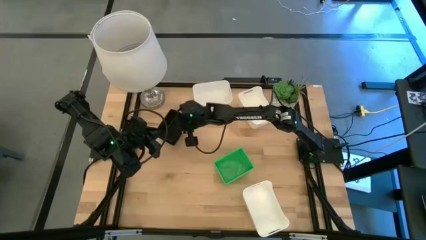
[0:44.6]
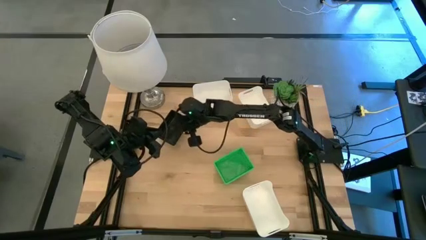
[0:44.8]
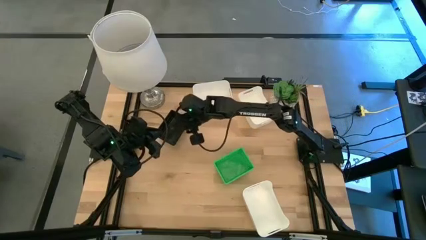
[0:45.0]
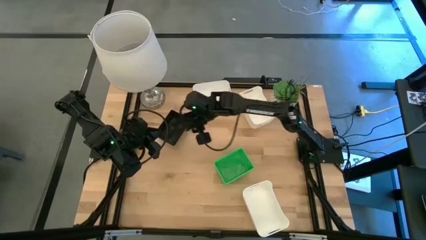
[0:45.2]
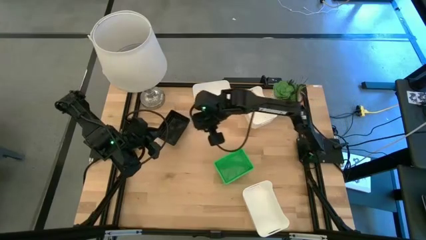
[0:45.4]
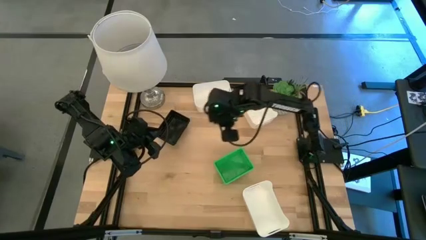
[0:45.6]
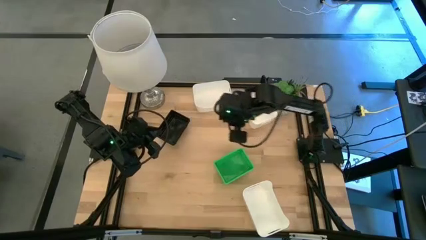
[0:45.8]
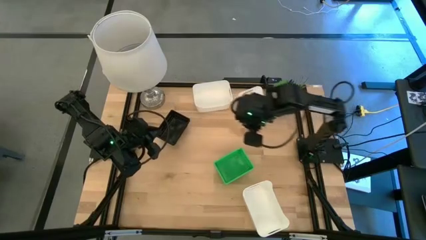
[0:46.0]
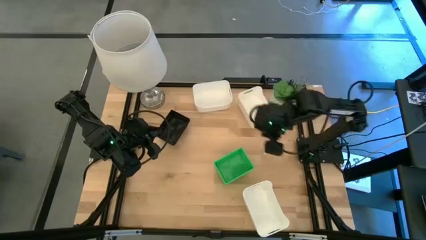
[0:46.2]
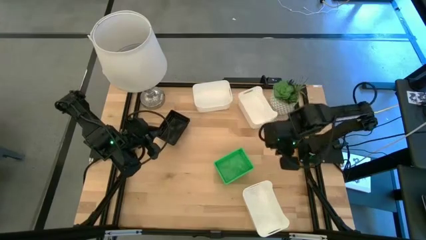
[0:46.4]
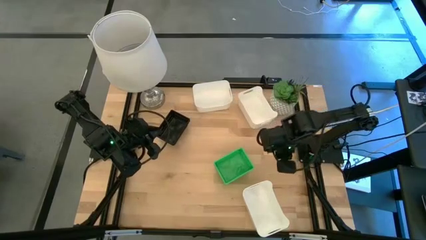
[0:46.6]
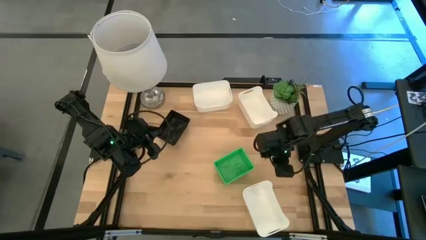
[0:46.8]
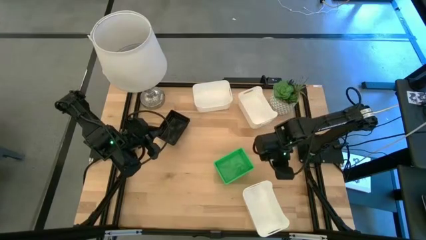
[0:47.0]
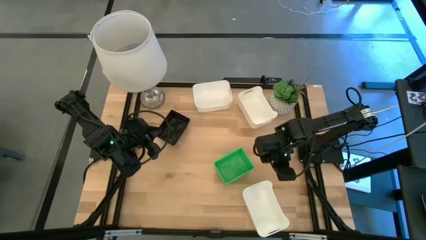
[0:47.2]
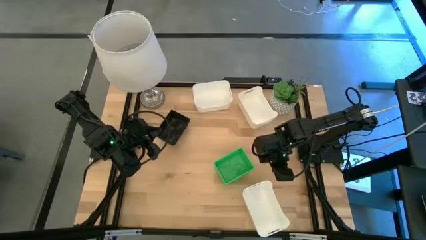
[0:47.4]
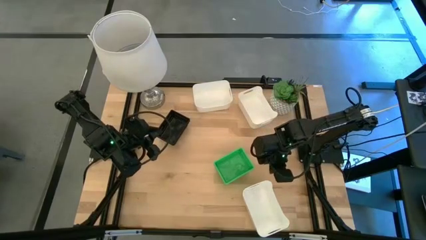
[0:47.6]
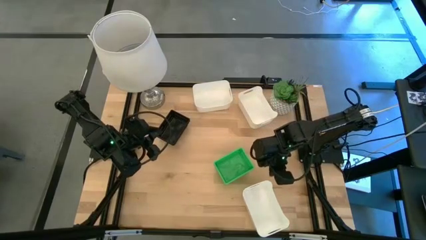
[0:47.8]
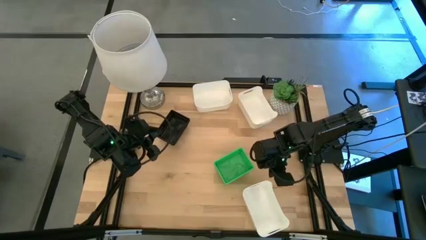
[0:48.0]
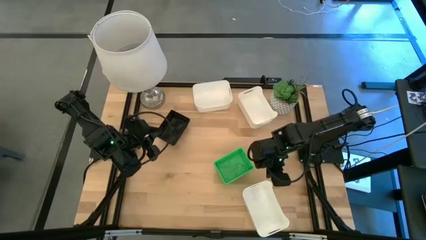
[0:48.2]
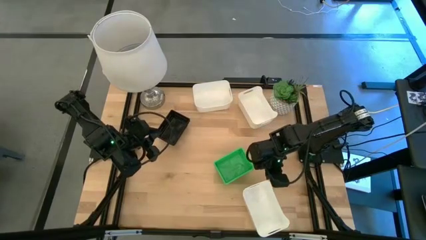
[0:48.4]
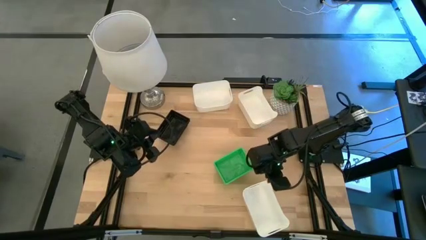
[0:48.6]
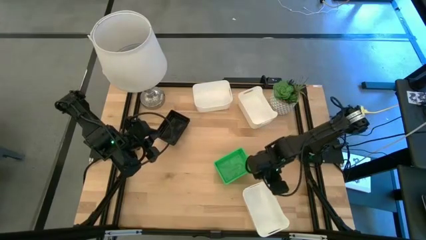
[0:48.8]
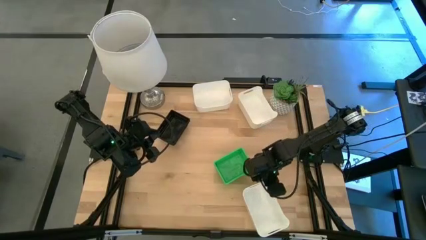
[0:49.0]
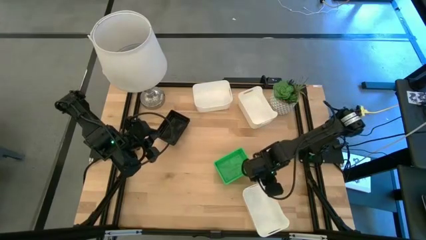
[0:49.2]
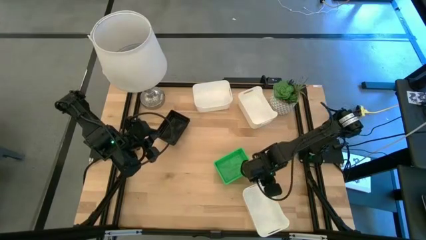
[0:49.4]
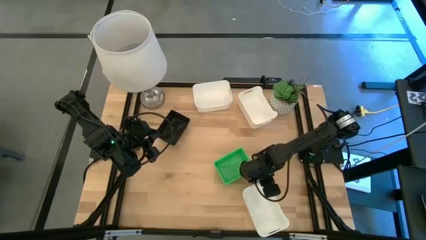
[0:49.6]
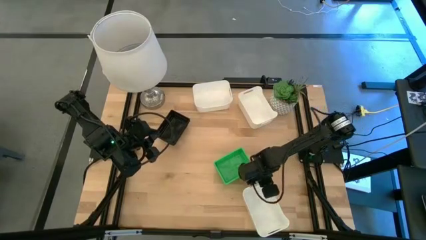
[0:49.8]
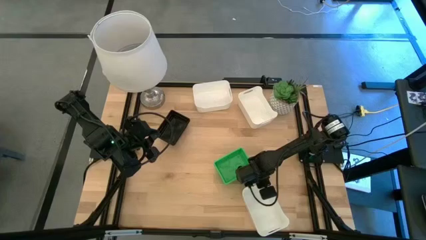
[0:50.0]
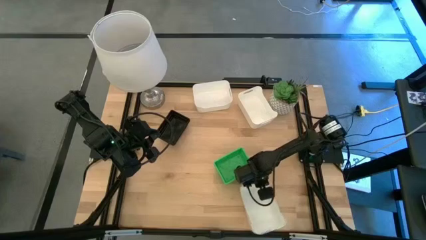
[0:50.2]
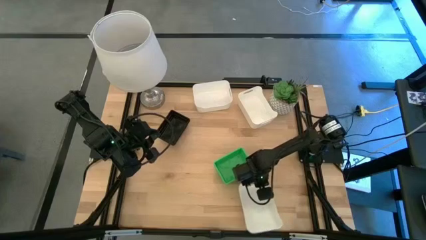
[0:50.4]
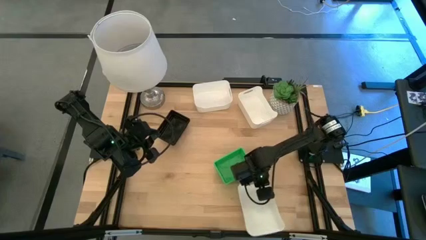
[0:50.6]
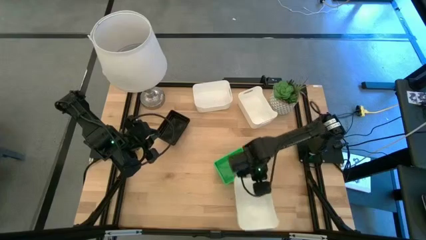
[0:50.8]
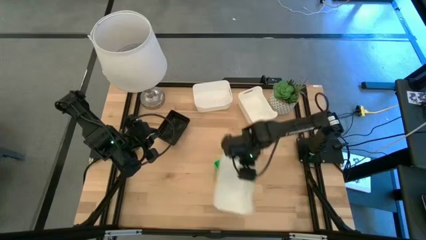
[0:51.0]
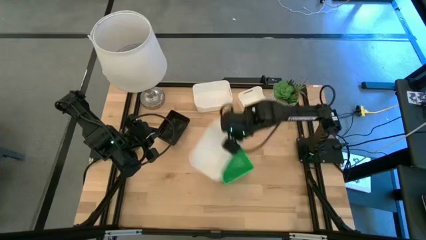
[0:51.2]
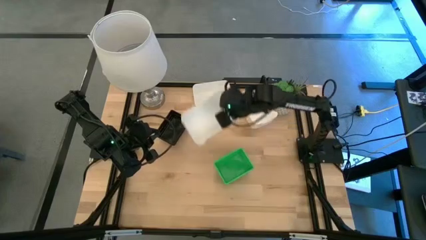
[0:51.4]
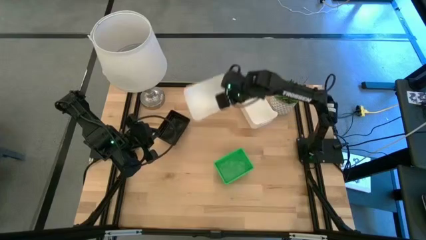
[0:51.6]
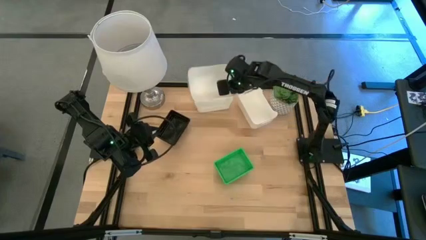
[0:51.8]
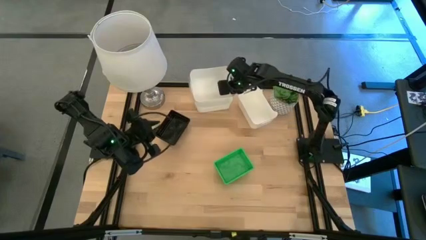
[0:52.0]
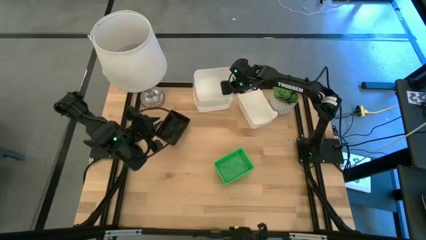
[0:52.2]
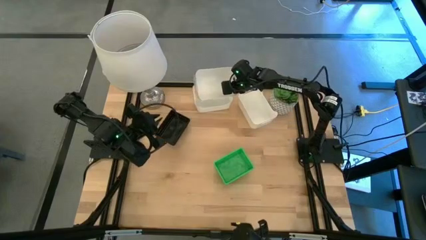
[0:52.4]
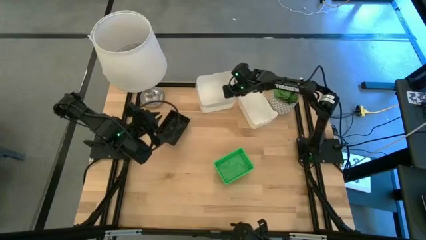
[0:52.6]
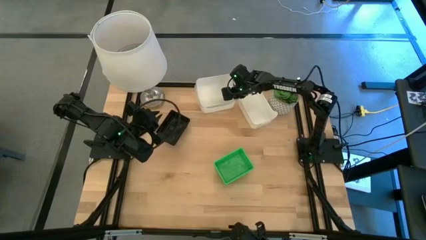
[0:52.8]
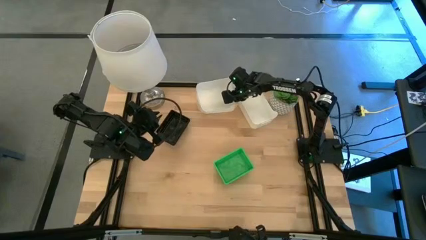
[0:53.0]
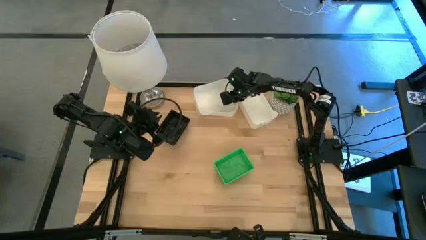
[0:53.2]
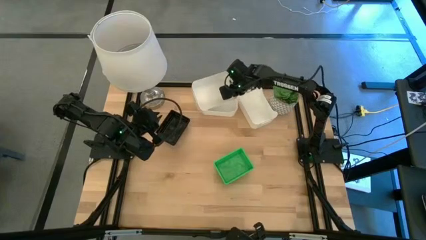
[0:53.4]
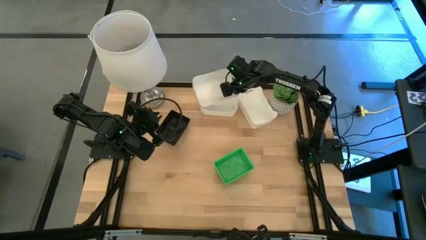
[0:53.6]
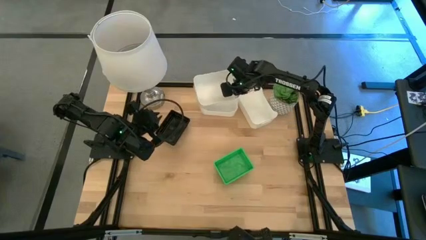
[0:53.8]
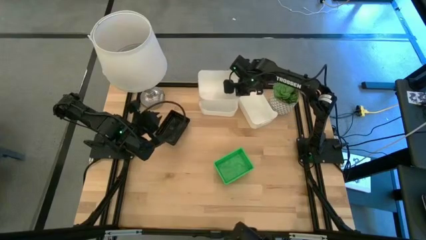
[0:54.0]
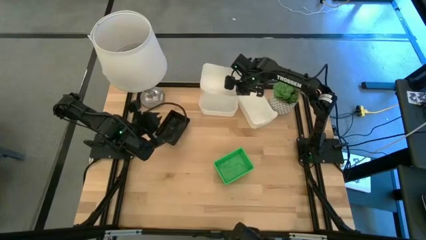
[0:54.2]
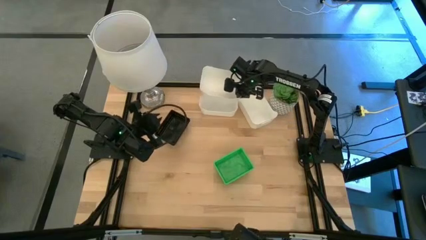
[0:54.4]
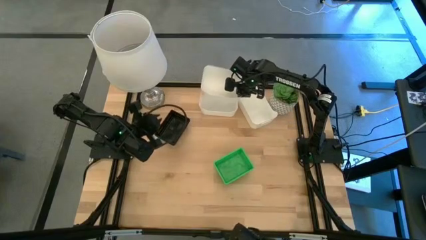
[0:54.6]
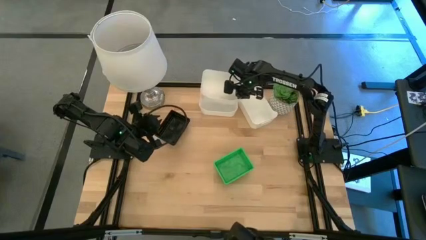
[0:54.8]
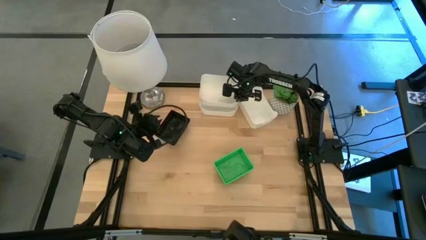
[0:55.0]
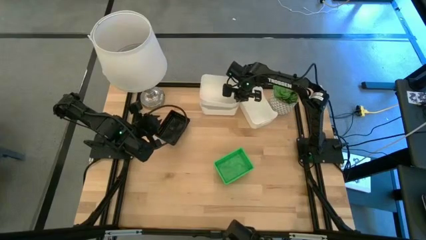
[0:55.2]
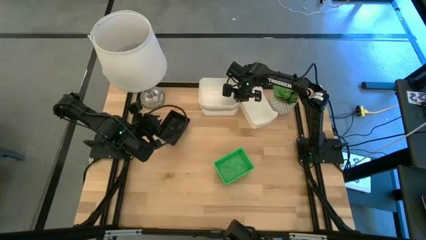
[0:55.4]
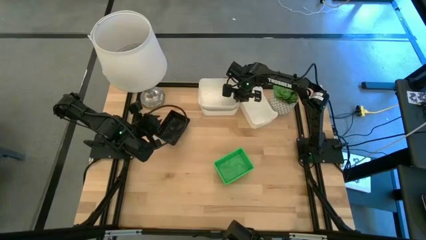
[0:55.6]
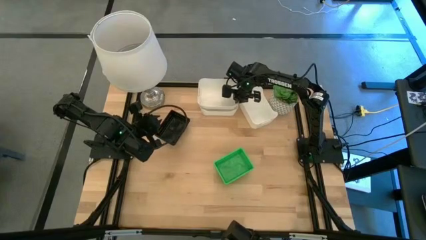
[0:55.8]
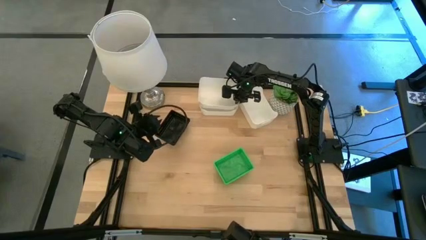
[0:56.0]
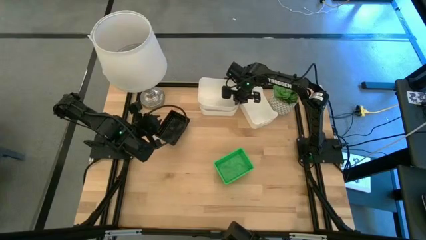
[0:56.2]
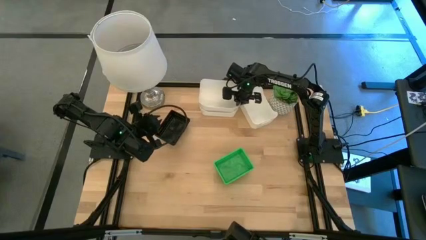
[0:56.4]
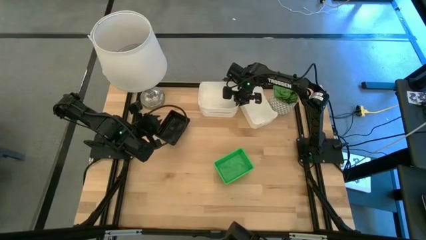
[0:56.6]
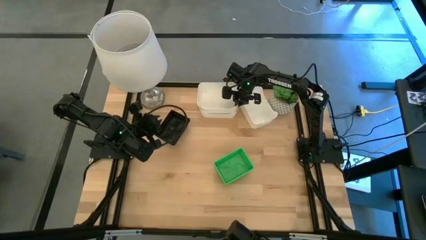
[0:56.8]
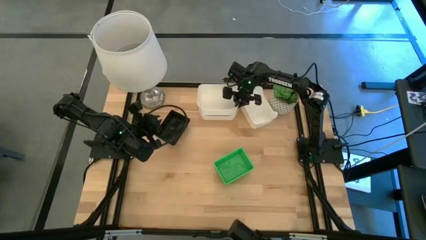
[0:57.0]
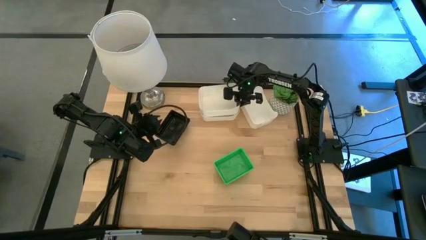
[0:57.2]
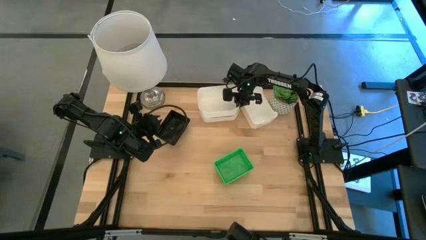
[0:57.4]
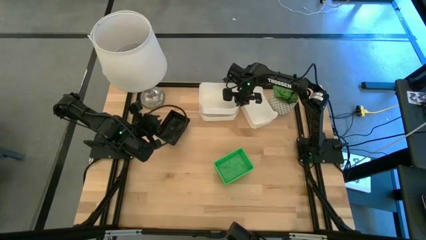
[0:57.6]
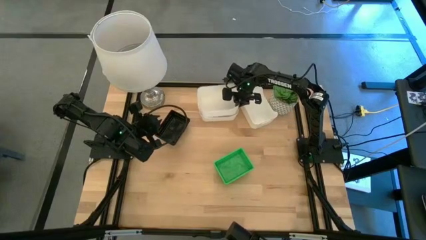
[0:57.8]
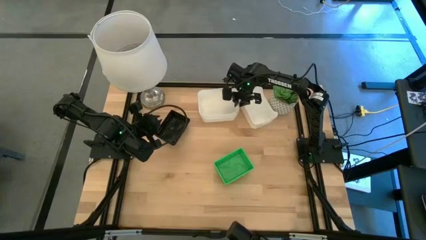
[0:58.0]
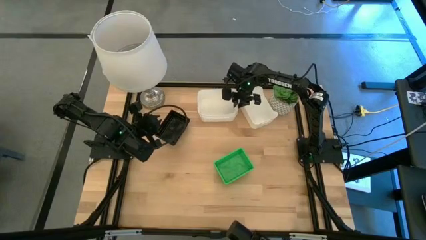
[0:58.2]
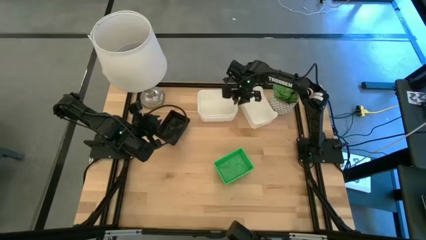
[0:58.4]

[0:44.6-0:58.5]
Stack the bottom white bin on the top left white bin
